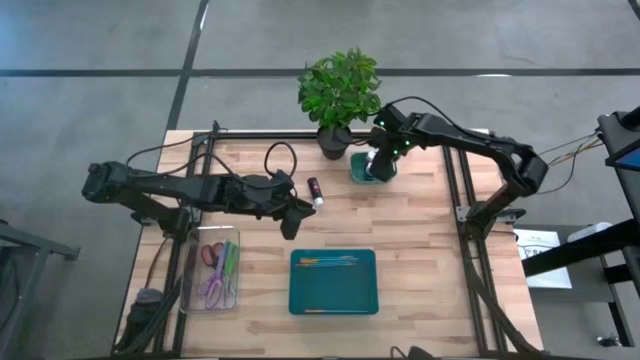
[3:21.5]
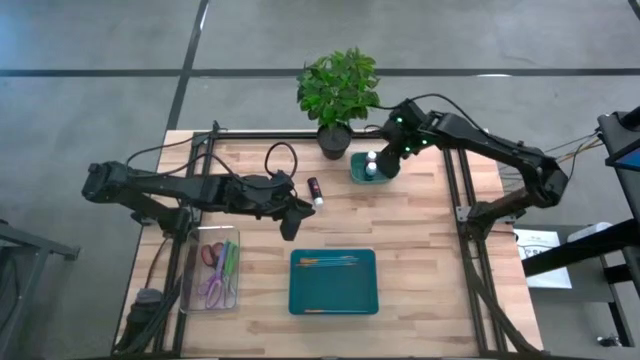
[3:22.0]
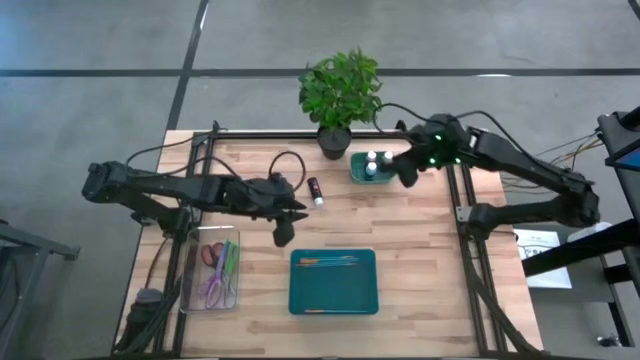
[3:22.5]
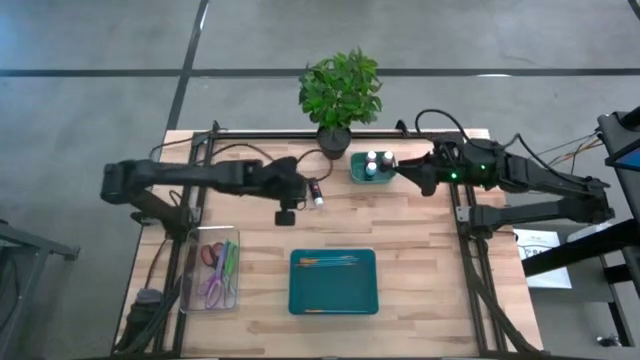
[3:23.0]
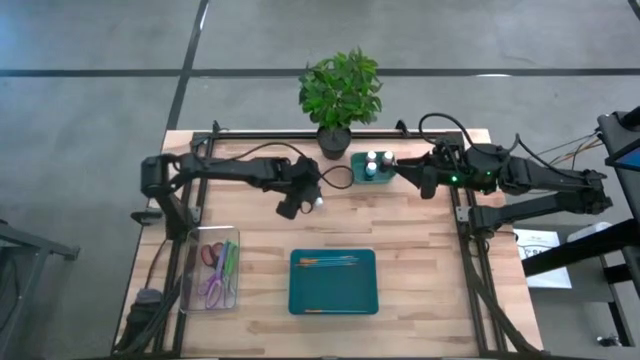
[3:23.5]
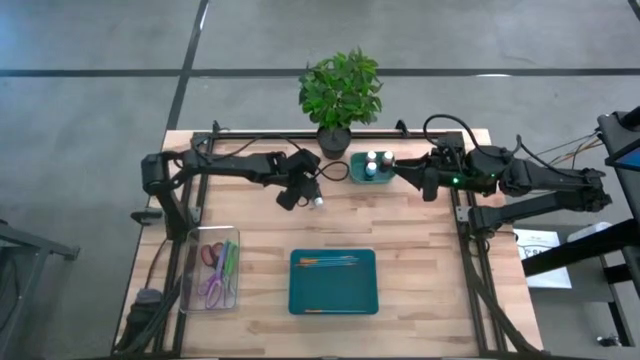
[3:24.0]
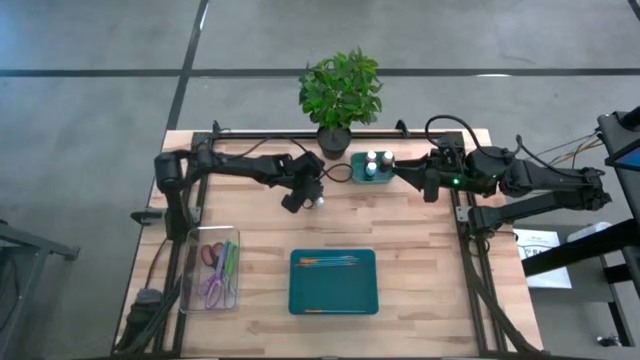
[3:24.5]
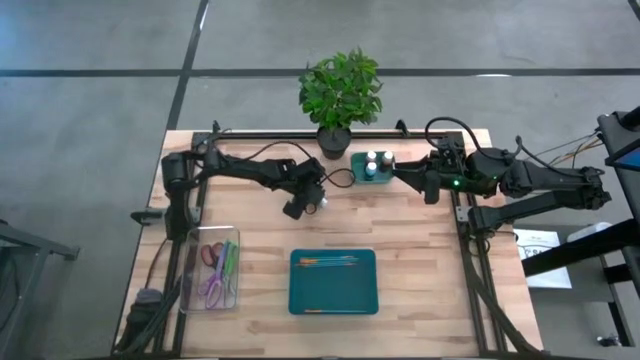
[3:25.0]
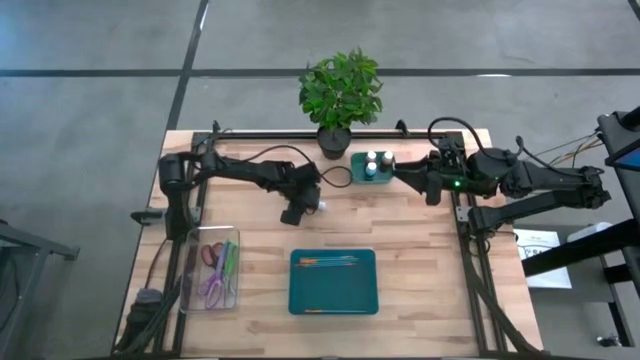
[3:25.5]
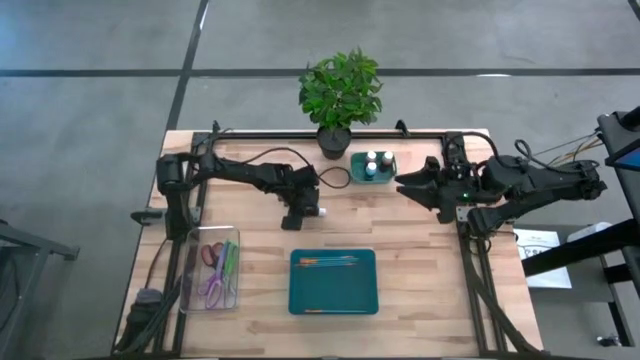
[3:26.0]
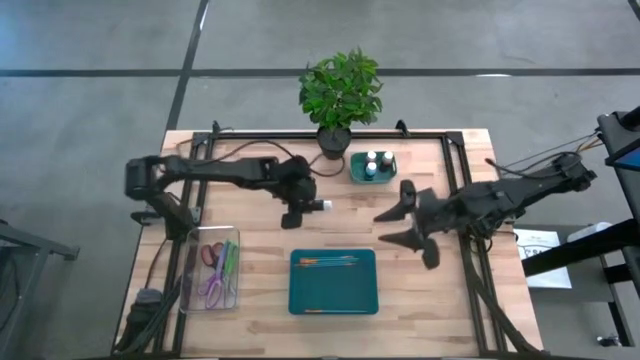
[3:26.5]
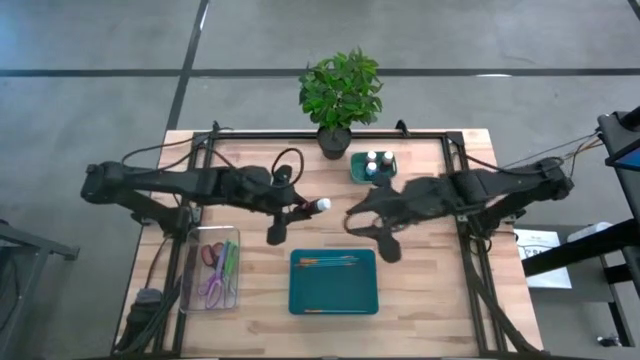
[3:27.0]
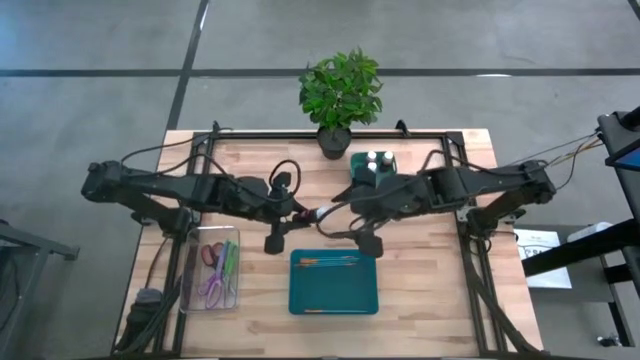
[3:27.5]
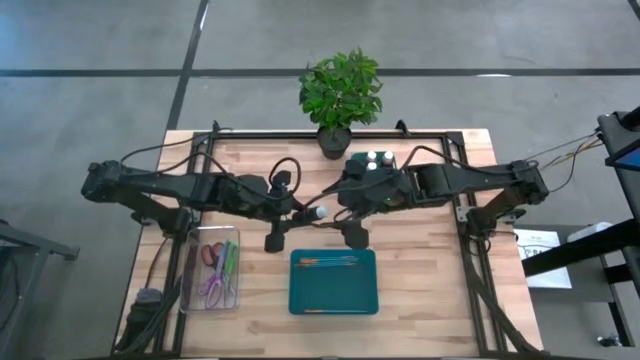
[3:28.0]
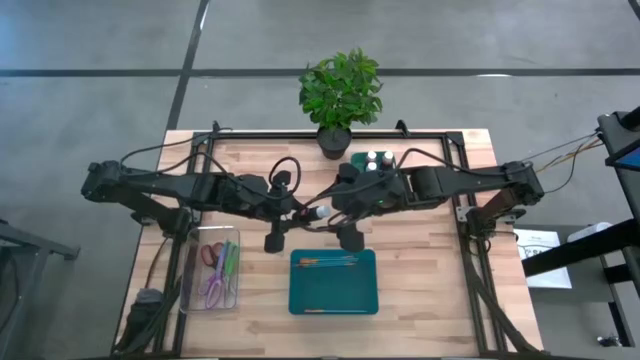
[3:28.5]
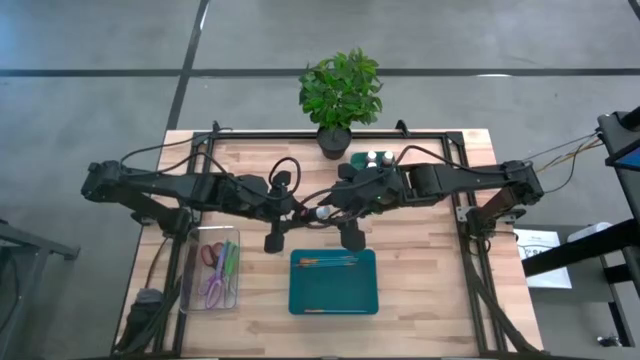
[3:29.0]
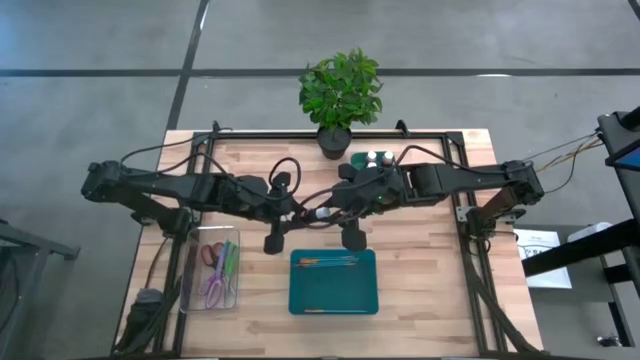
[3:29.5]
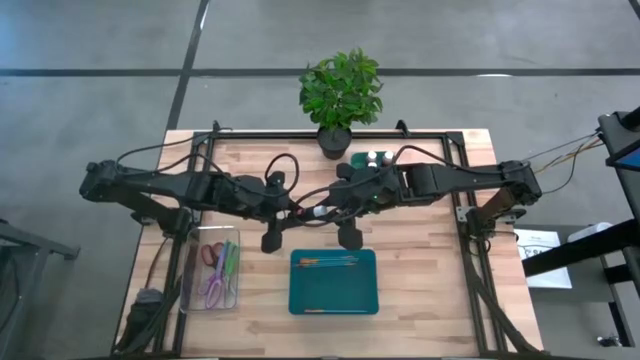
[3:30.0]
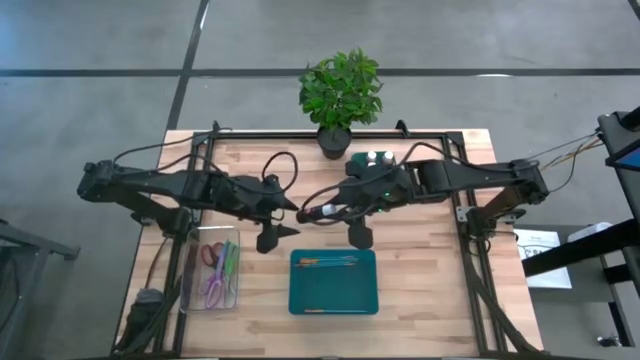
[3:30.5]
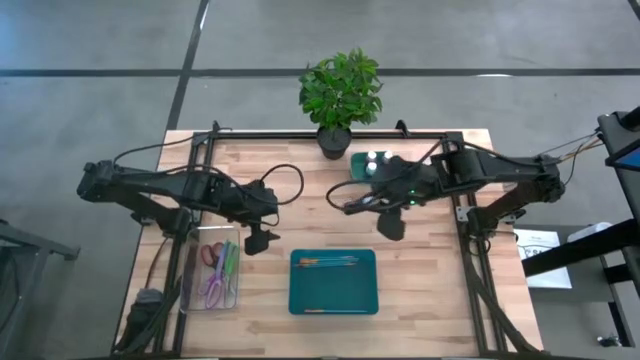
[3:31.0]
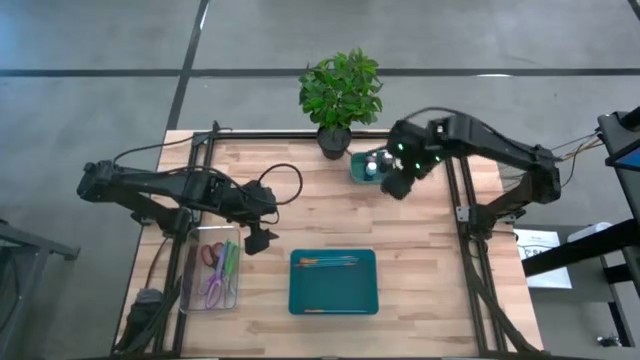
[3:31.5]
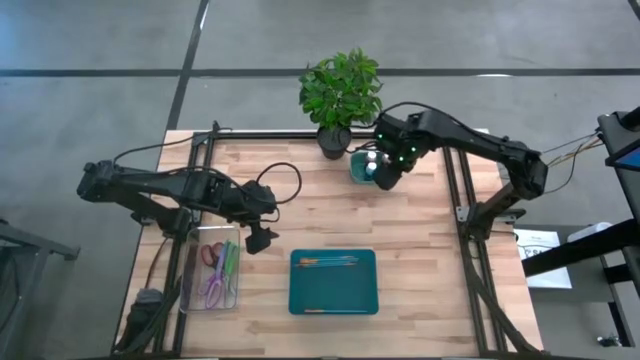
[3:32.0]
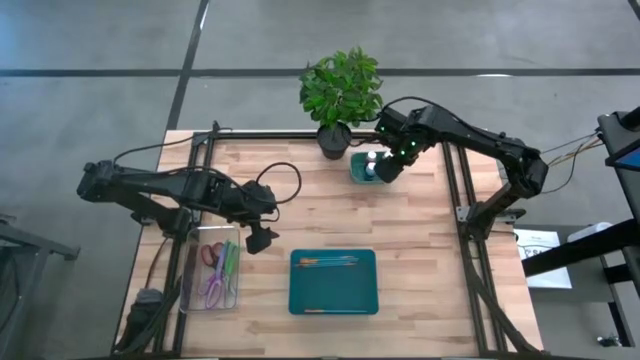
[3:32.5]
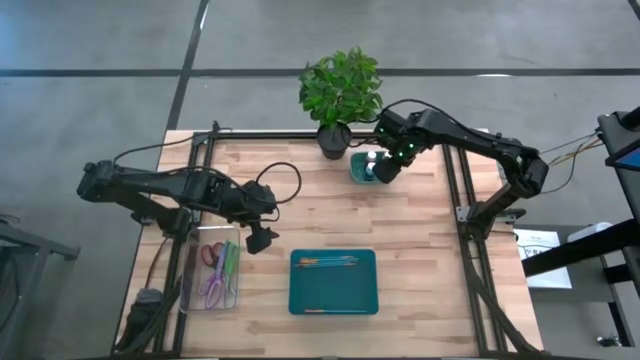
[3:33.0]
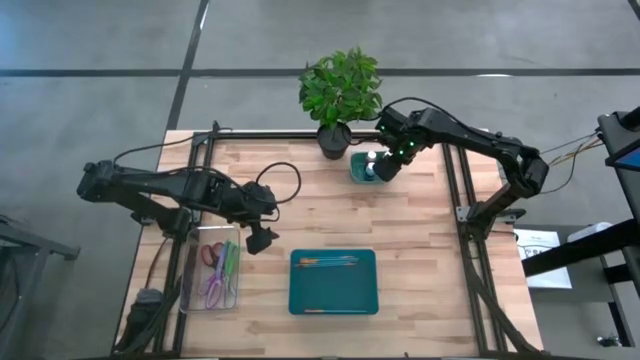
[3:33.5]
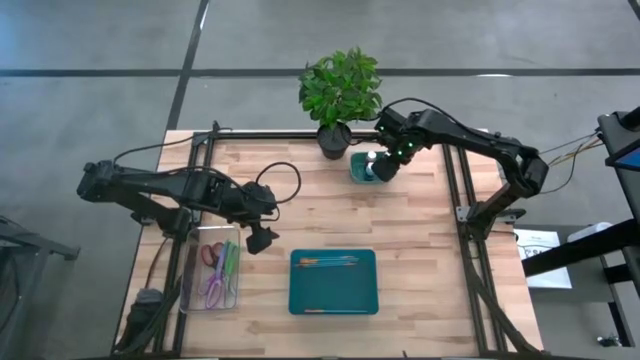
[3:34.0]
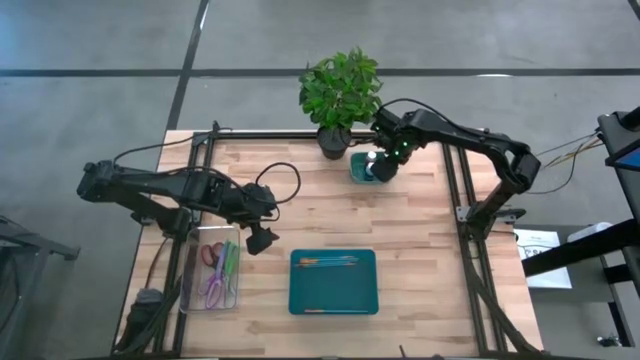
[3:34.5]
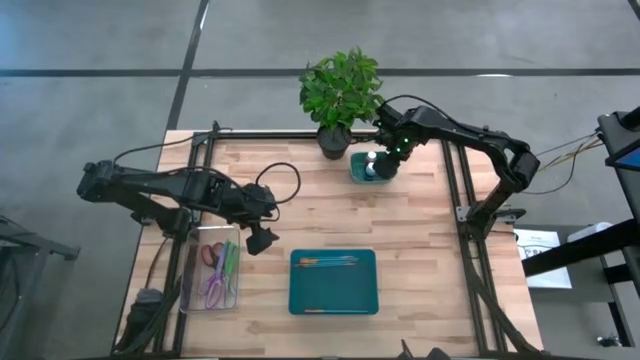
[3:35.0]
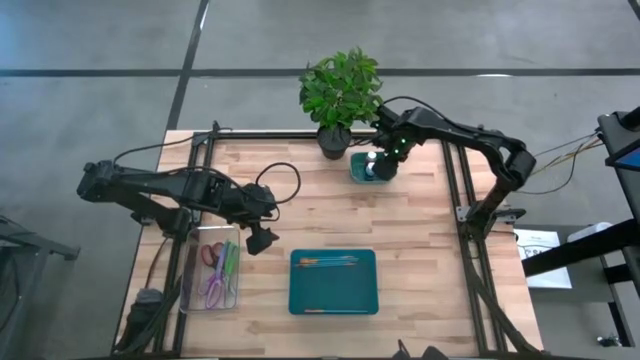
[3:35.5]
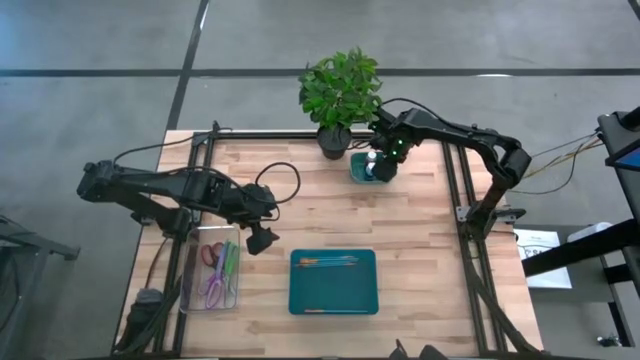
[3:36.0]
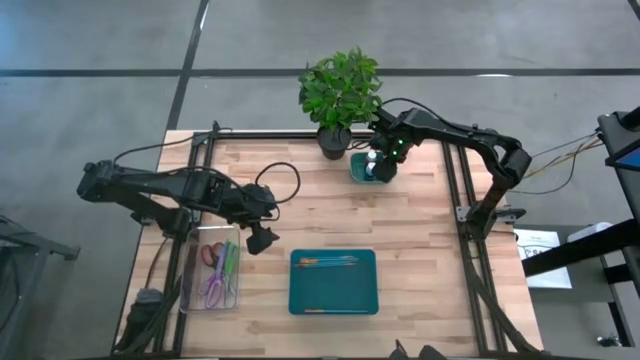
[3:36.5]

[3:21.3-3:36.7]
Task: Pick & Place Paint Supplies
Put the black paint bottle into the green bin

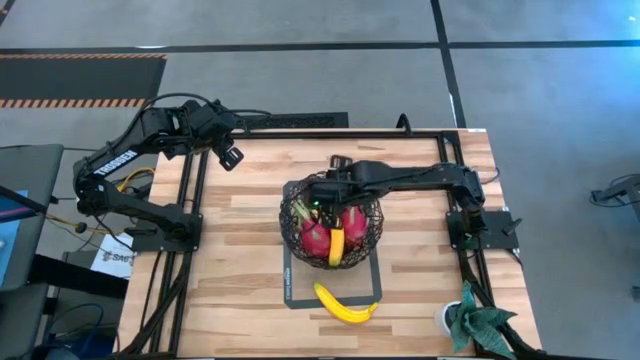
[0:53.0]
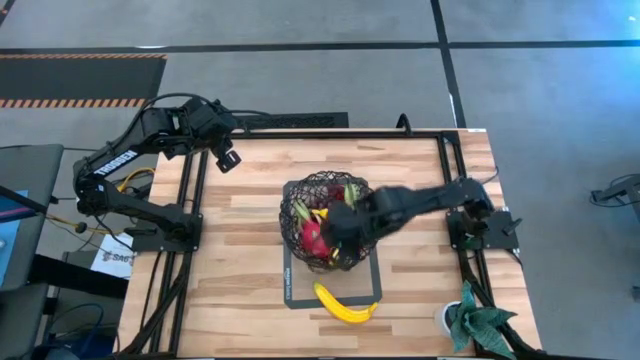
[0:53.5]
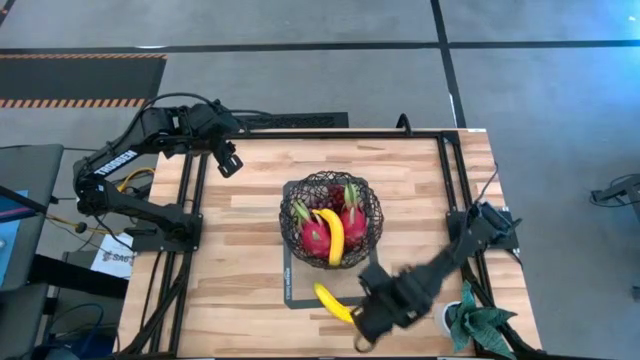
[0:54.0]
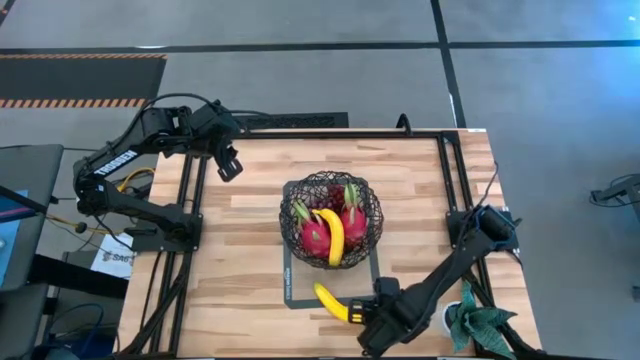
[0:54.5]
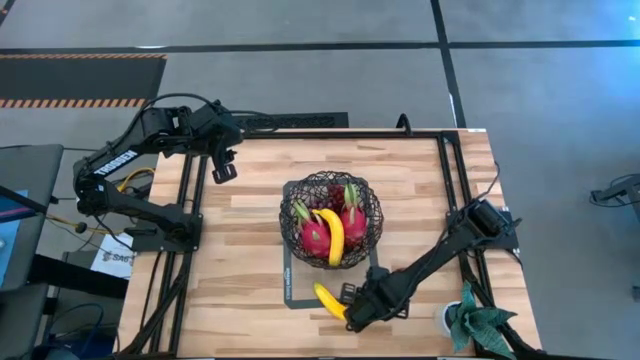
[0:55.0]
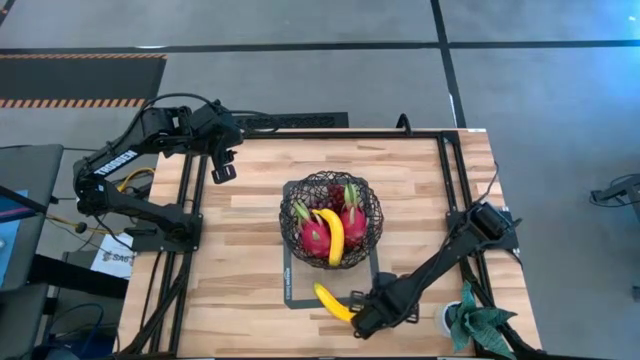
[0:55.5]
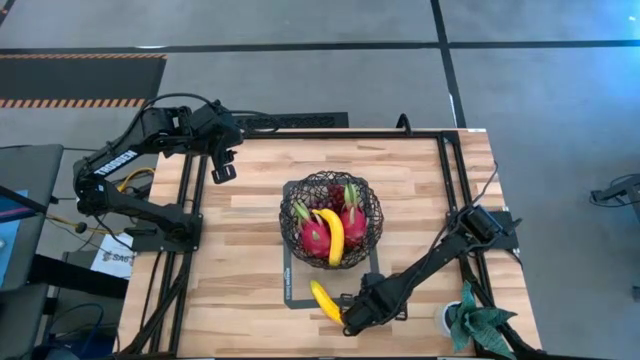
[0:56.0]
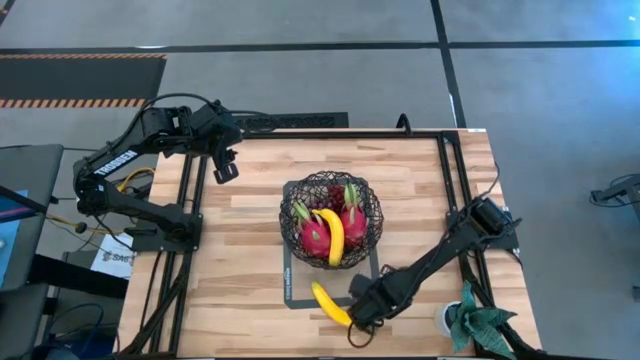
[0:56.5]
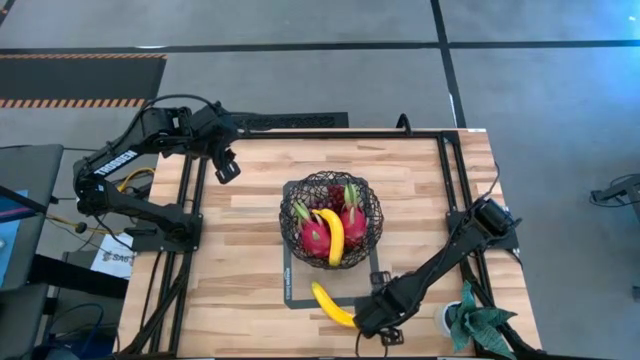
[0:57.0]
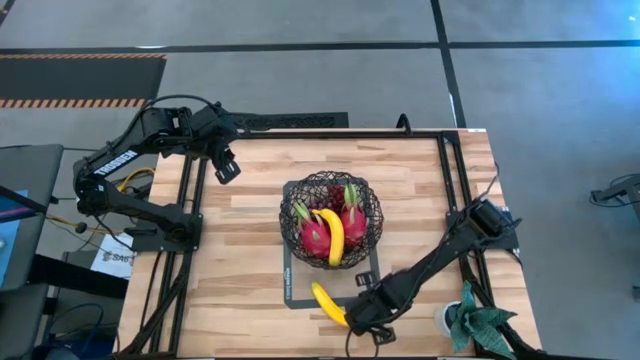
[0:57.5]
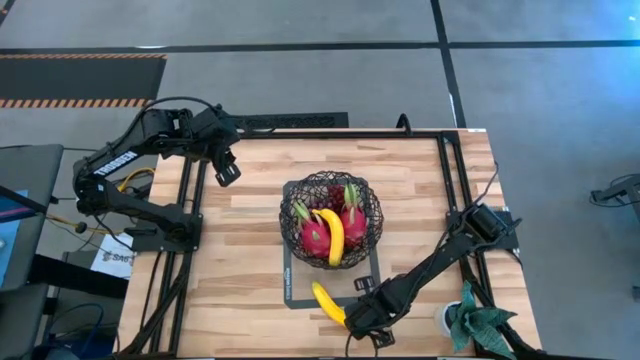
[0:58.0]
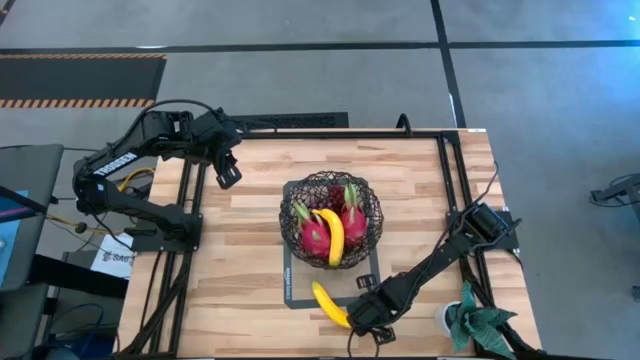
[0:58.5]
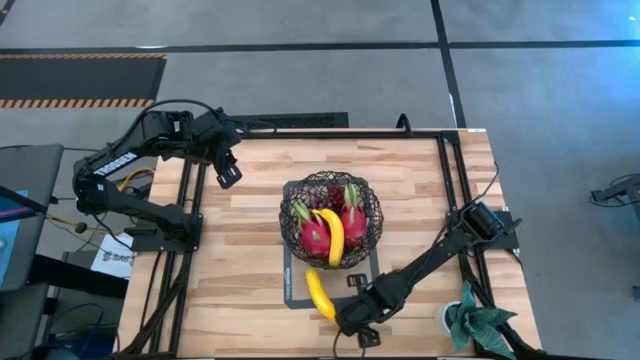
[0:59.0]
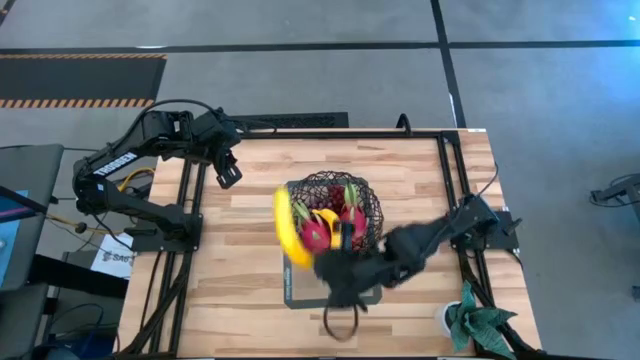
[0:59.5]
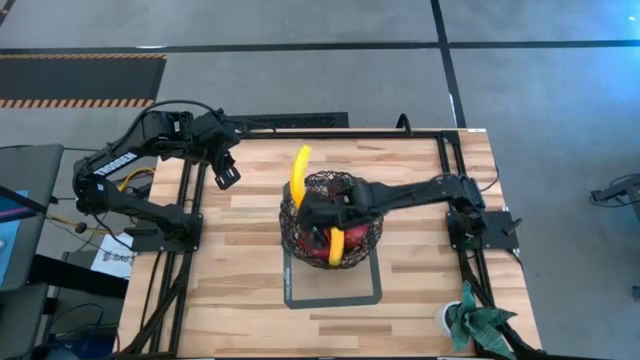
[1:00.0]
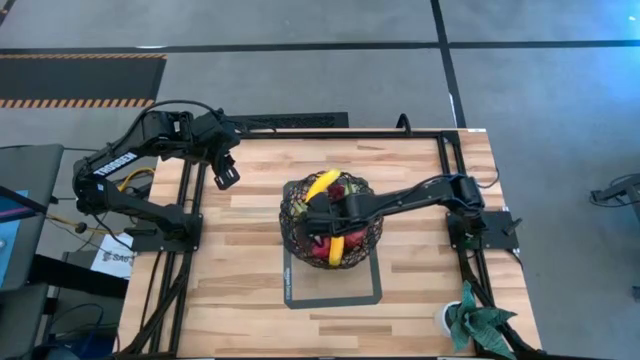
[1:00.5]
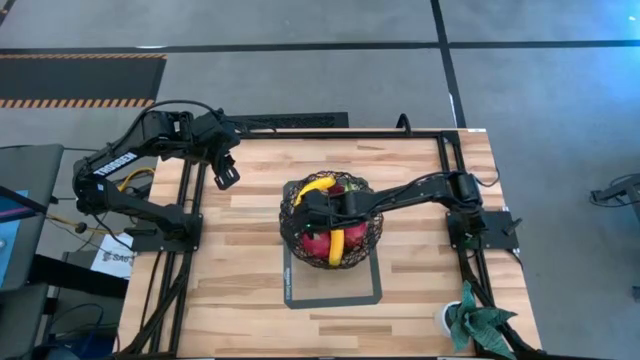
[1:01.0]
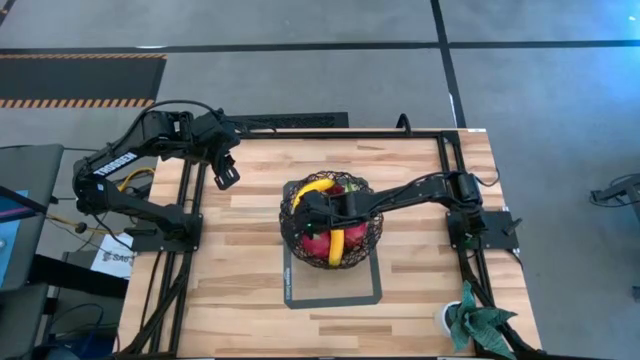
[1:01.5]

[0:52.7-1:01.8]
Task: Build produce basket
Put the yellow banana into the black wire basket
